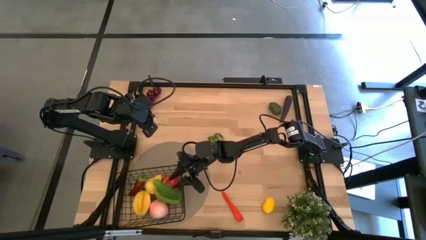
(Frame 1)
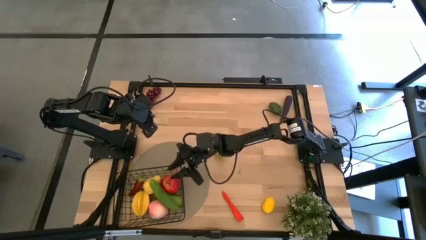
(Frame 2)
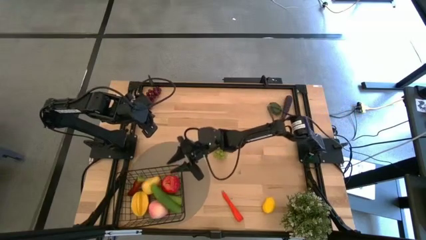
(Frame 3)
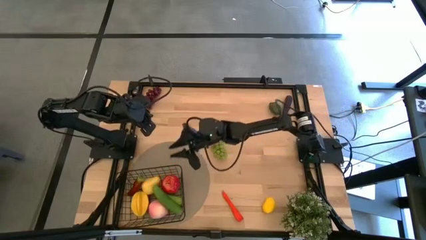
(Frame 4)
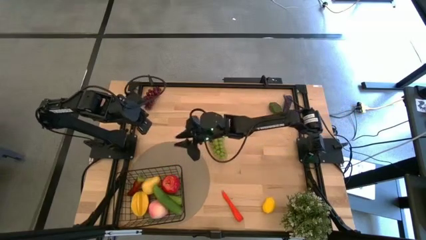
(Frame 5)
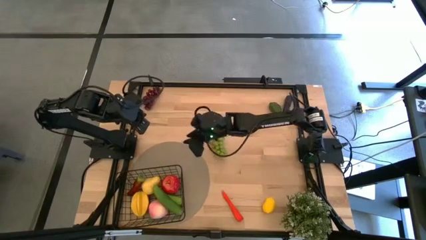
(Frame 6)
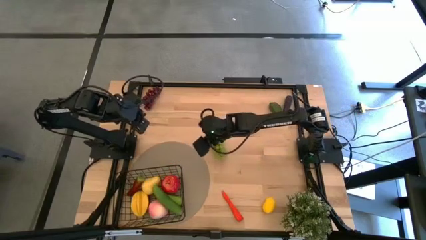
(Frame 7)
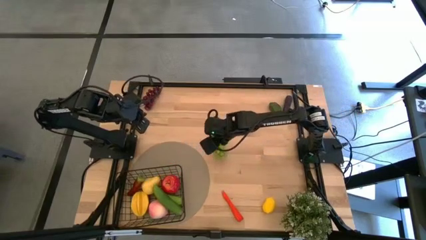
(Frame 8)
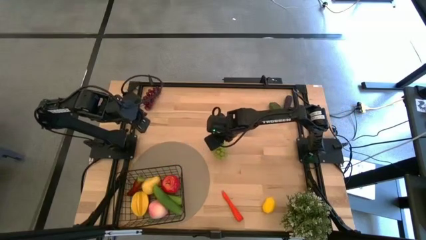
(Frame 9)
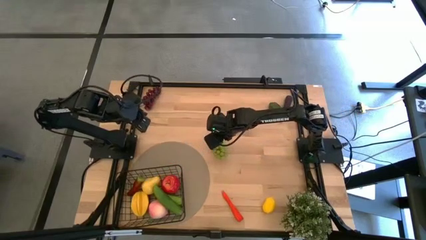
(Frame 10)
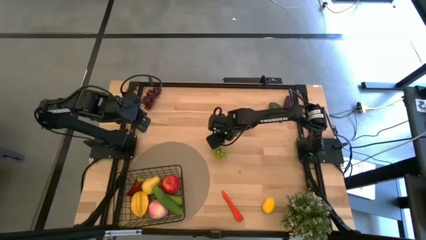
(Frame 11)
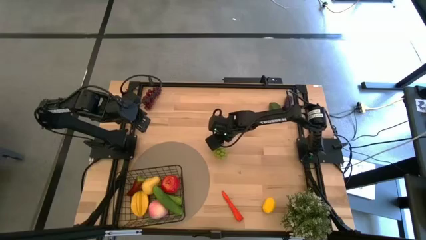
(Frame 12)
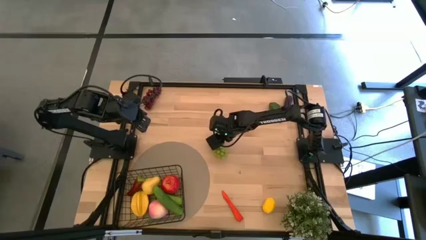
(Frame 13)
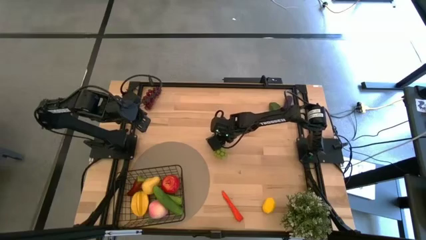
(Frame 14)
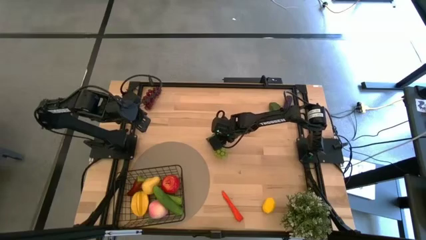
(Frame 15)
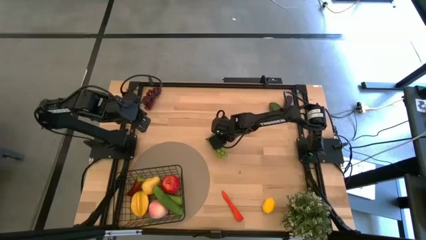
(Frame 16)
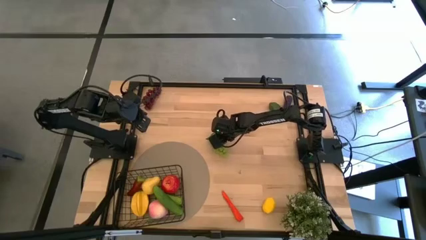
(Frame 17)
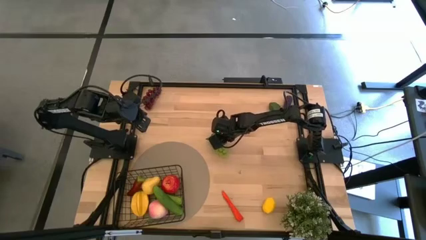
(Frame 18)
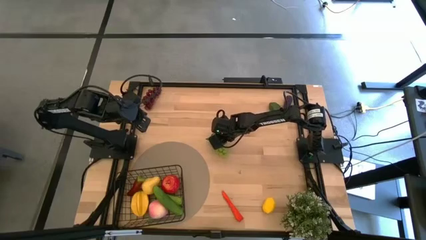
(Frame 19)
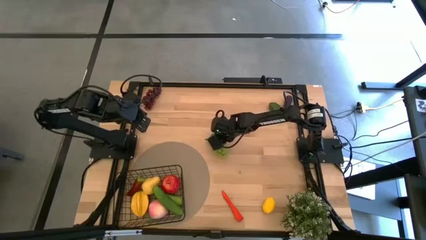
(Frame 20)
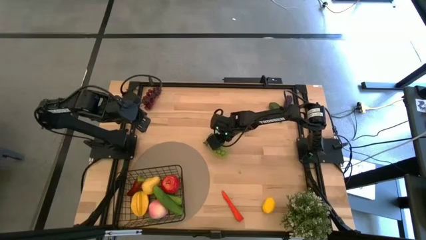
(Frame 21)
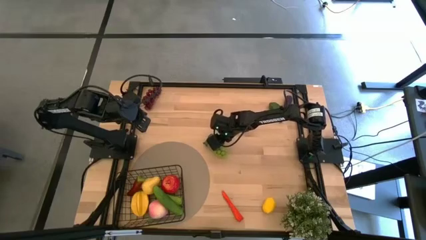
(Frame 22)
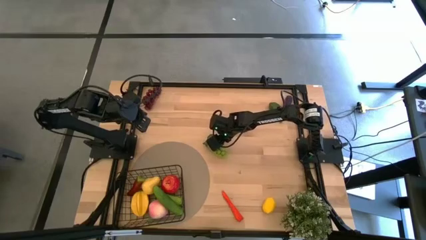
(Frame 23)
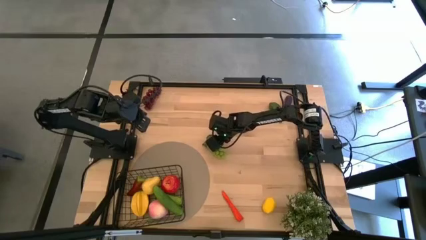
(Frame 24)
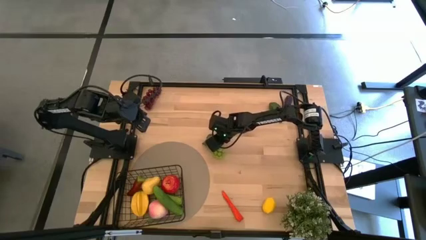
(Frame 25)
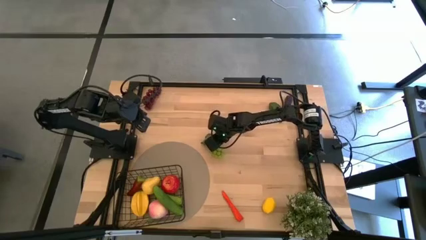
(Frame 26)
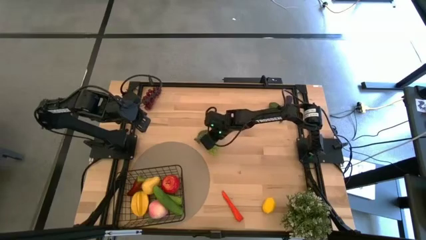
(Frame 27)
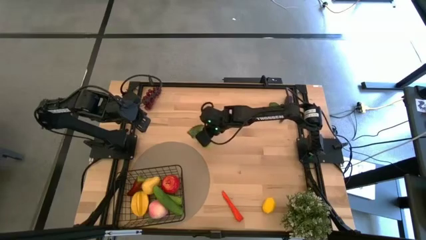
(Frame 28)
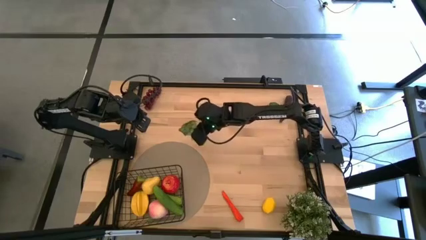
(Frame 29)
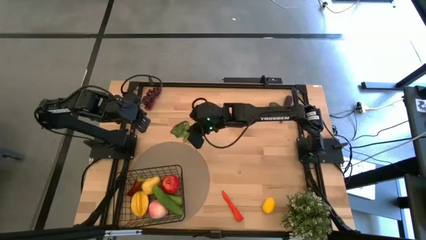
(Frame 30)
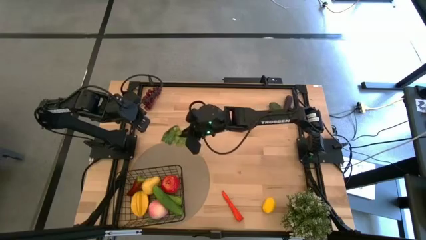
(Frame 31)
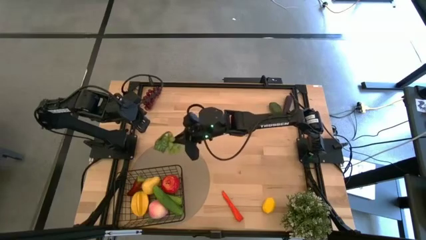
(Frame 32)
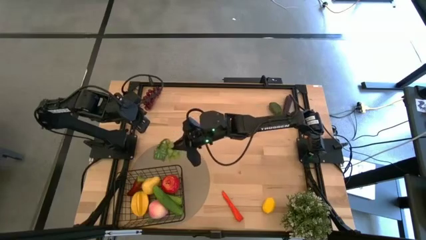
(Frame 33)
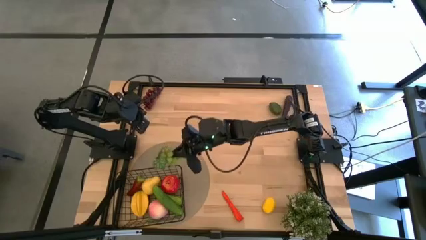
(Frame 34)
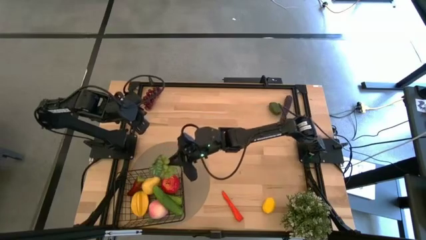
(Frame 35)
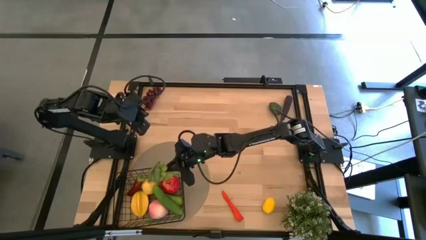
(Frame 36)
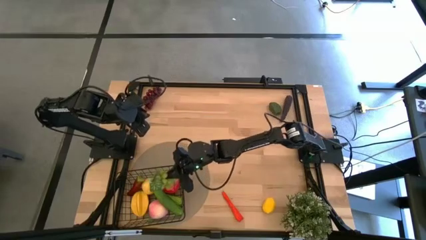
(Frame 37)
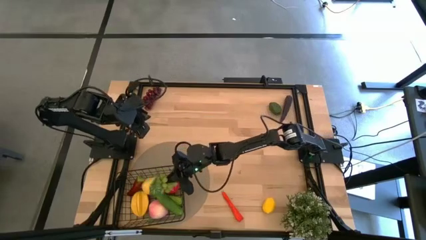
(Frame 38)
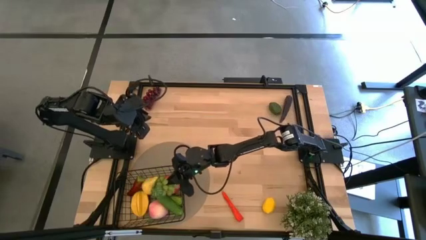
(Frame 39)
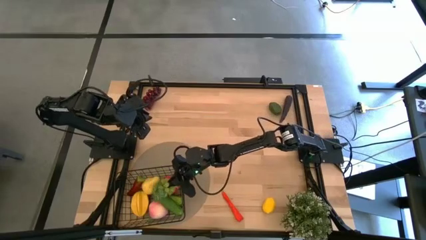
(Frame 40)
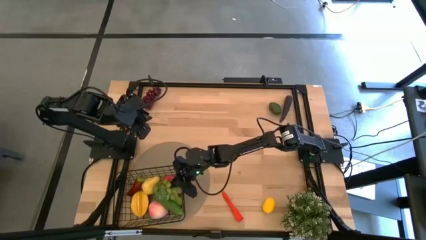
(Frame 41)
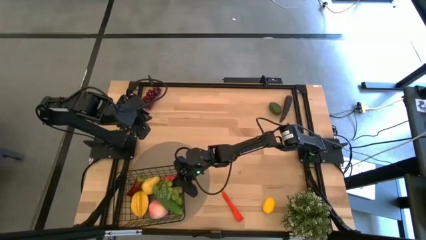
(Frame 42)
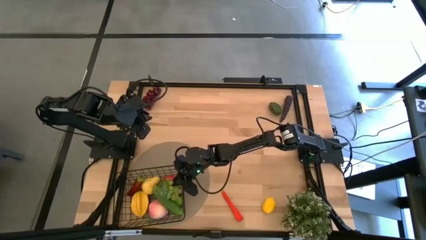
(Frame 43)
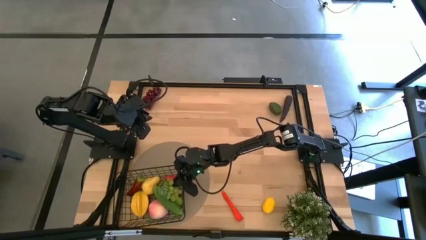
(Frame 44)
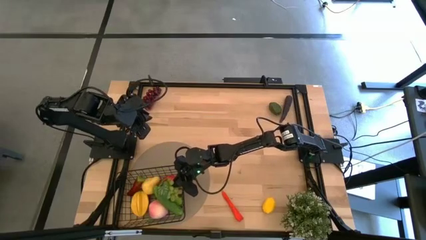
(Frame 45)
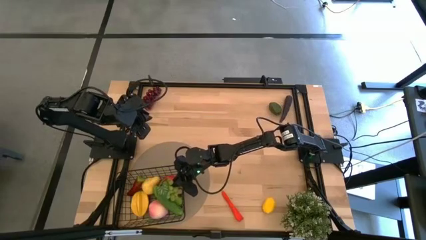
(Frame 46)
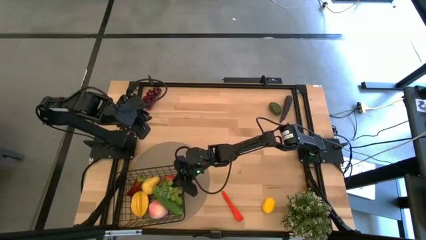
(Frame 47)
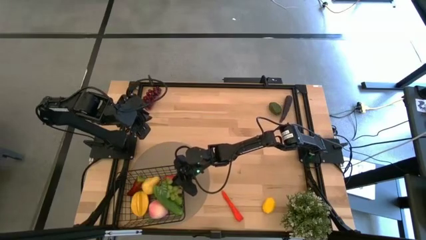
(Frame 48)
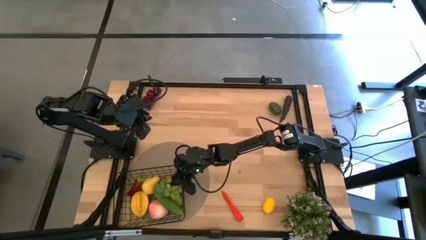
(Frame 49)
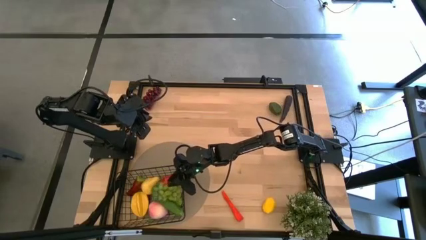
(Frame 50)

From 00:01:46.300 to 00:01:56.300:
Task: Build produce basket
Put the green grapes into the wire basket
